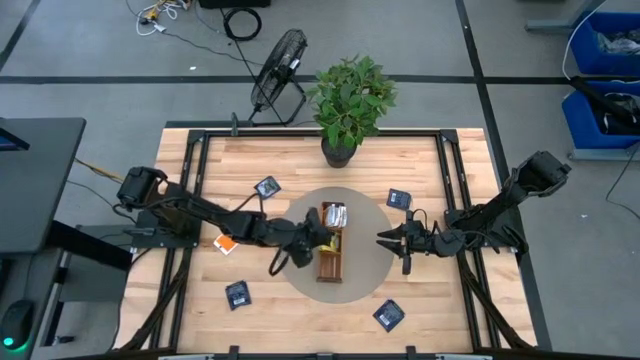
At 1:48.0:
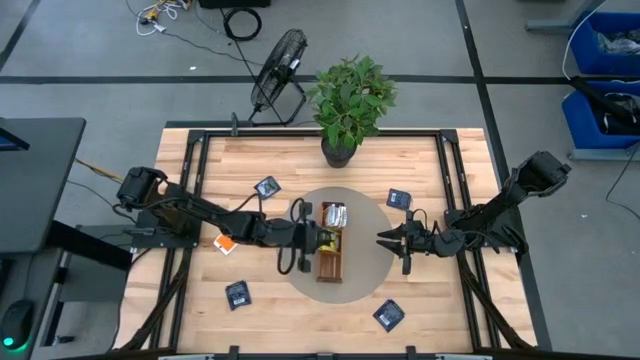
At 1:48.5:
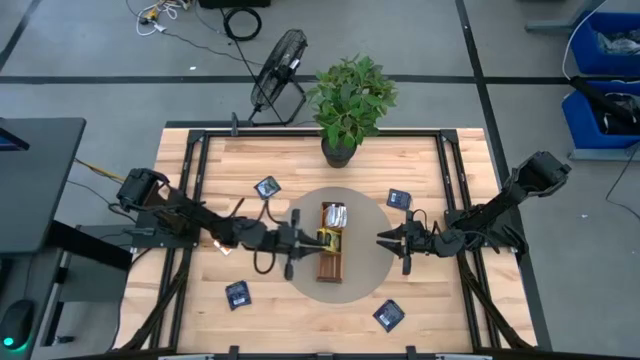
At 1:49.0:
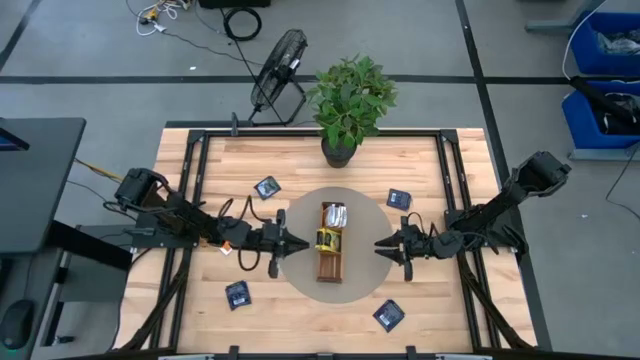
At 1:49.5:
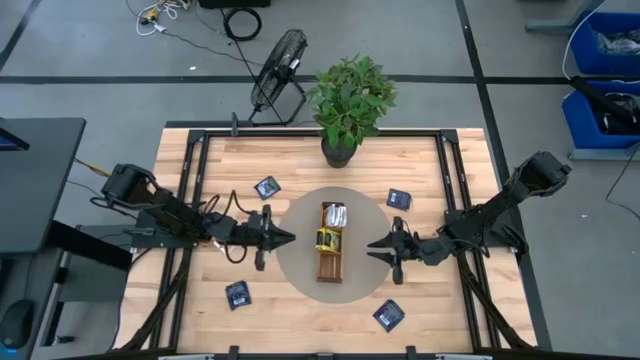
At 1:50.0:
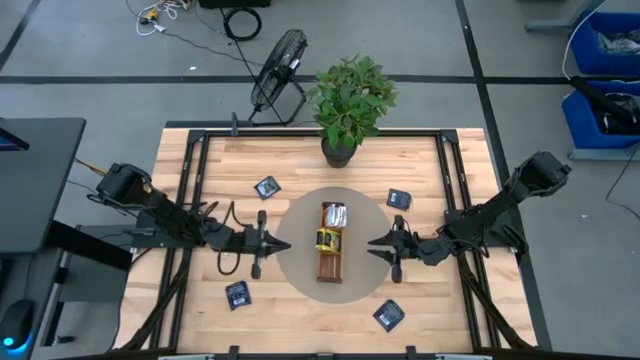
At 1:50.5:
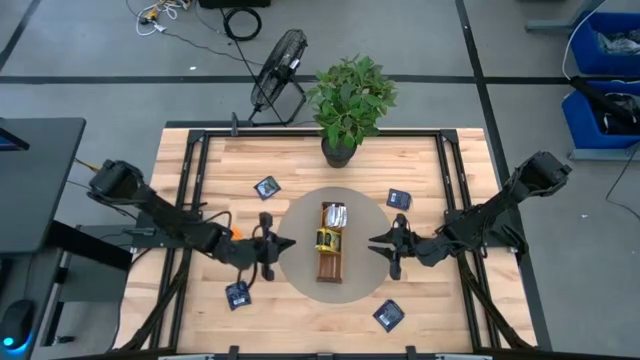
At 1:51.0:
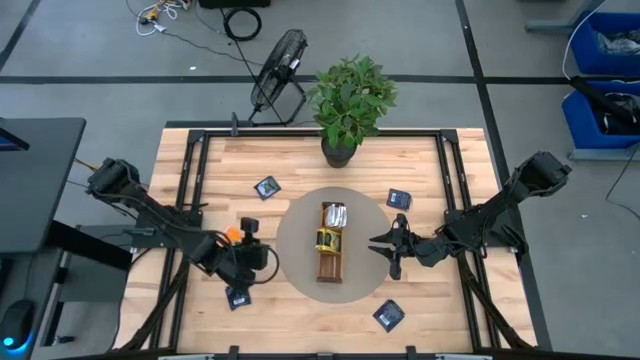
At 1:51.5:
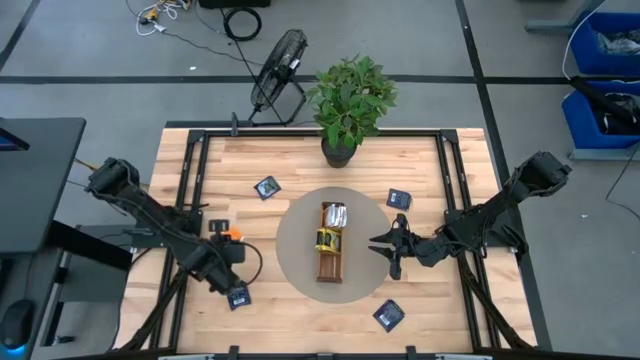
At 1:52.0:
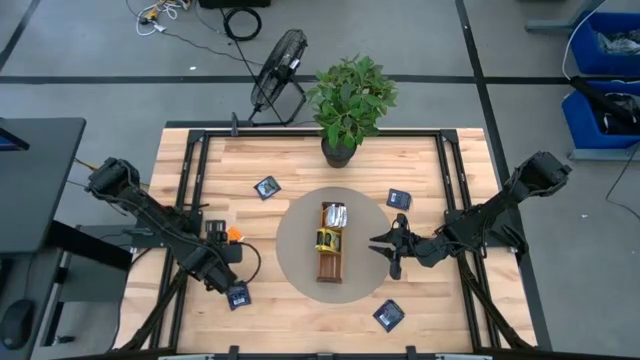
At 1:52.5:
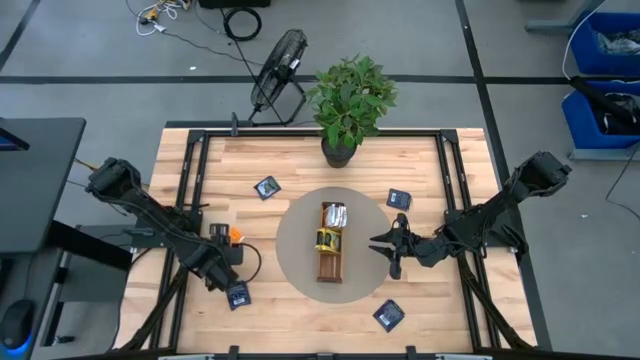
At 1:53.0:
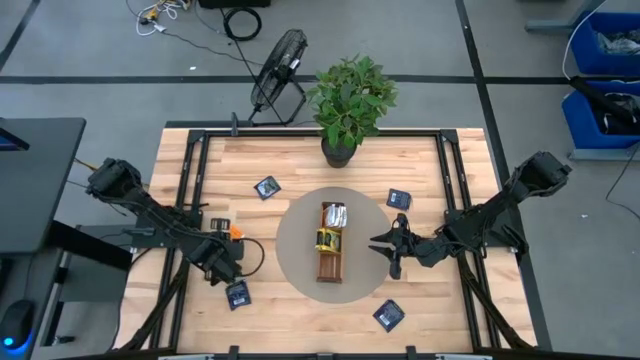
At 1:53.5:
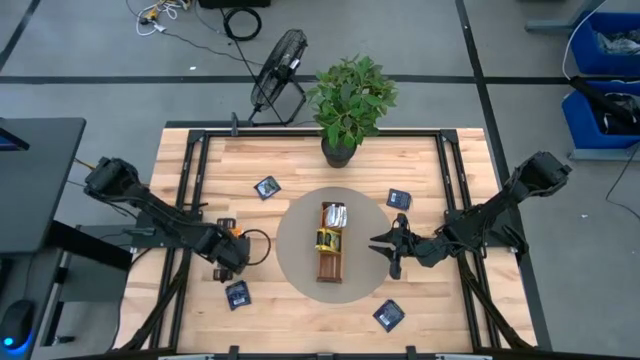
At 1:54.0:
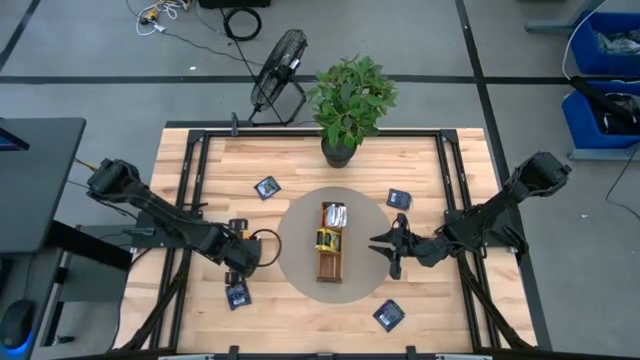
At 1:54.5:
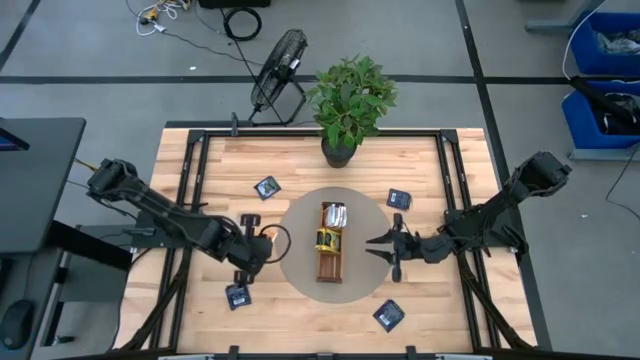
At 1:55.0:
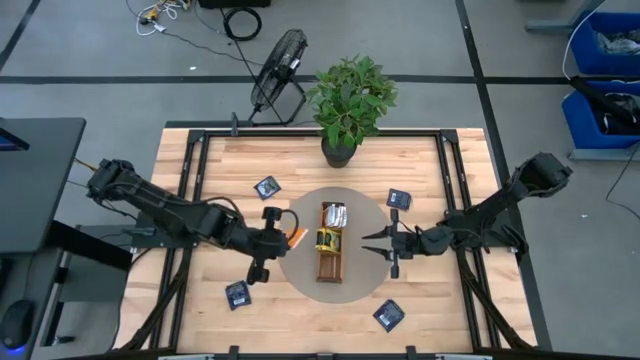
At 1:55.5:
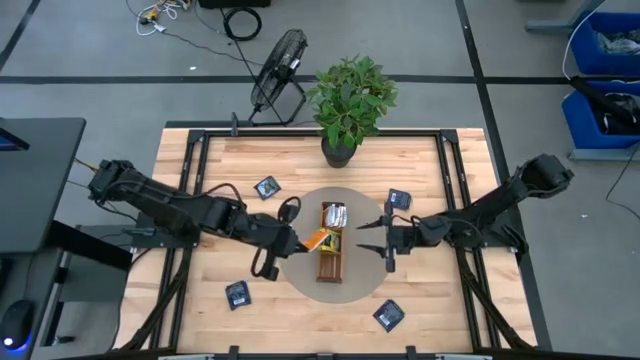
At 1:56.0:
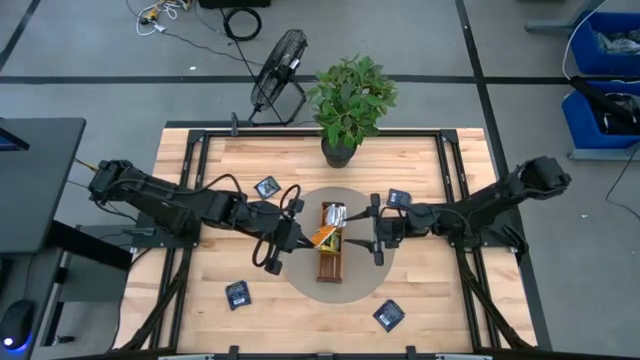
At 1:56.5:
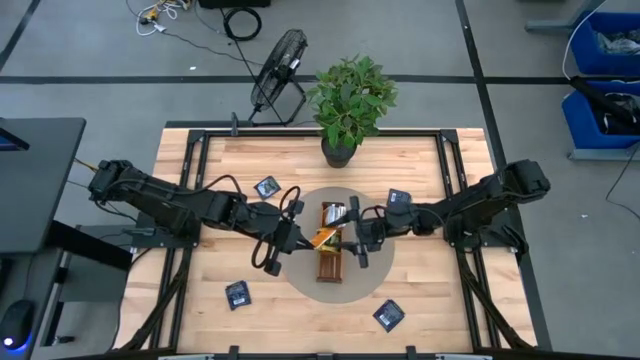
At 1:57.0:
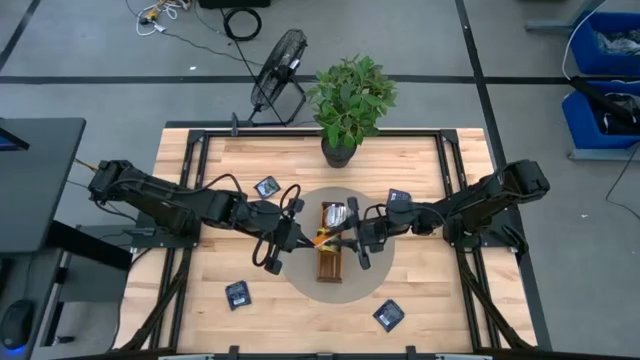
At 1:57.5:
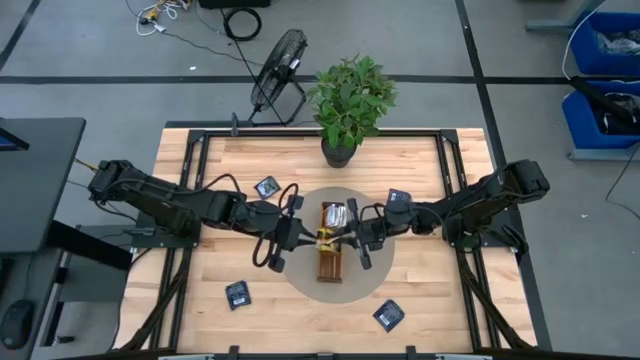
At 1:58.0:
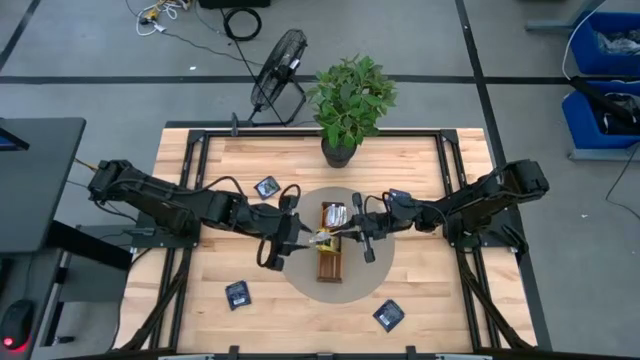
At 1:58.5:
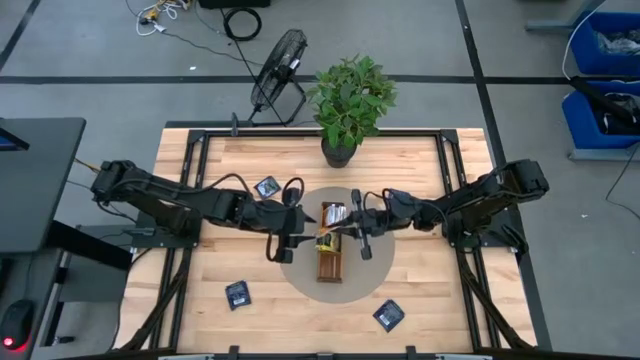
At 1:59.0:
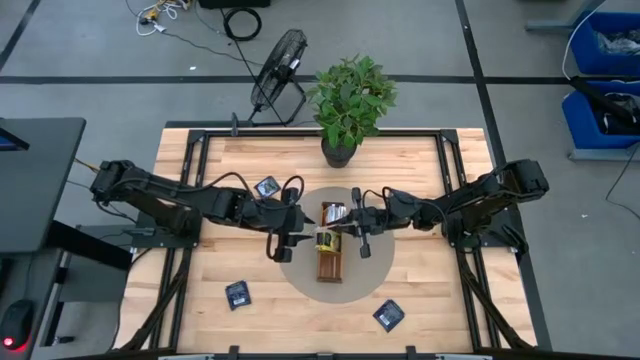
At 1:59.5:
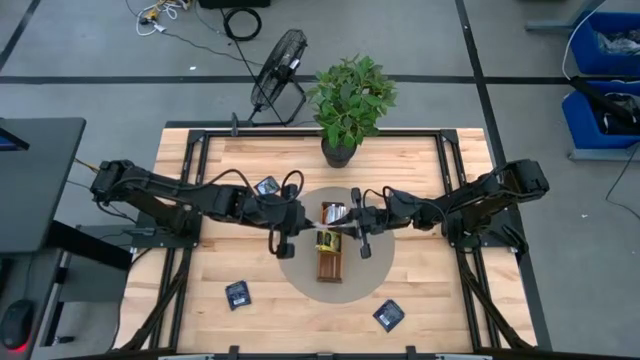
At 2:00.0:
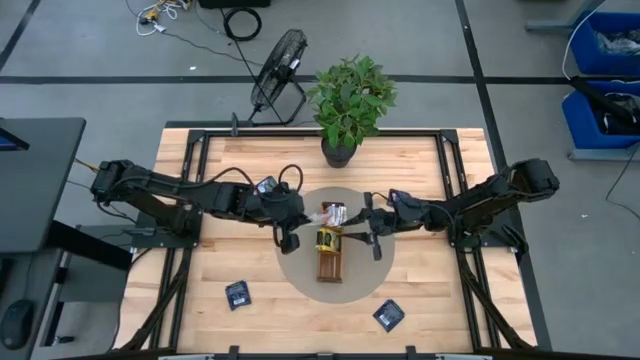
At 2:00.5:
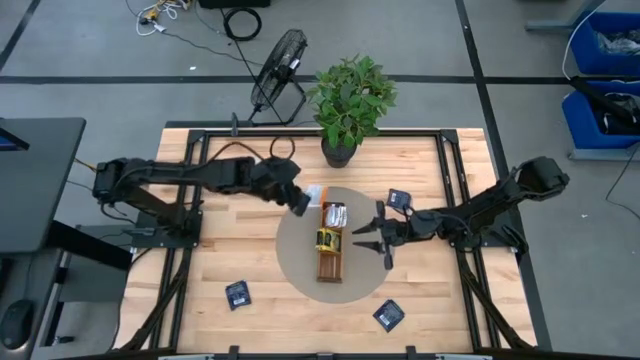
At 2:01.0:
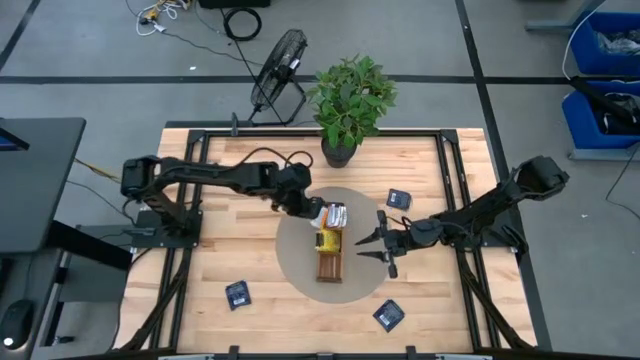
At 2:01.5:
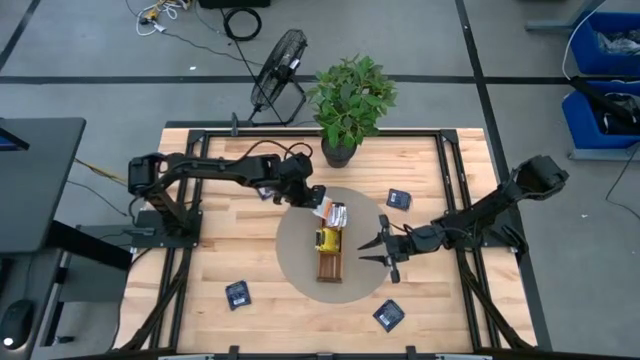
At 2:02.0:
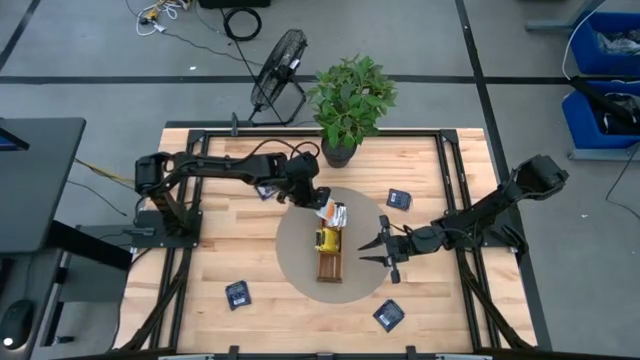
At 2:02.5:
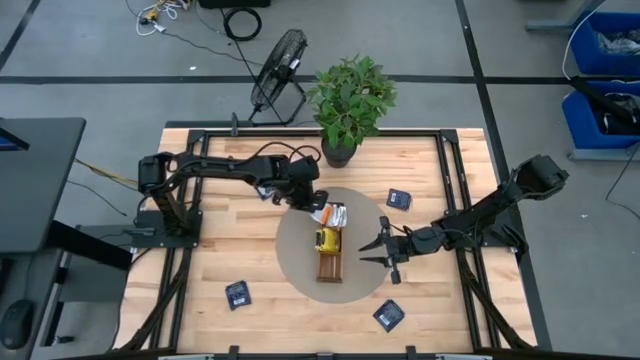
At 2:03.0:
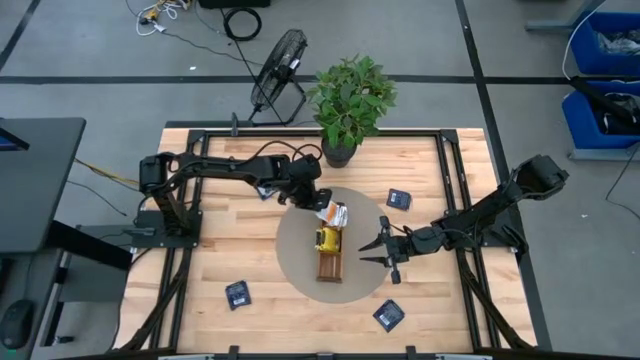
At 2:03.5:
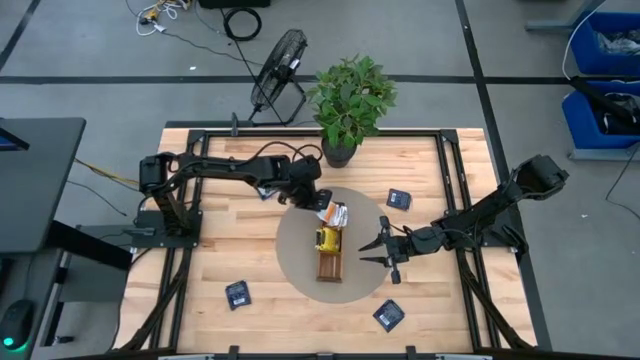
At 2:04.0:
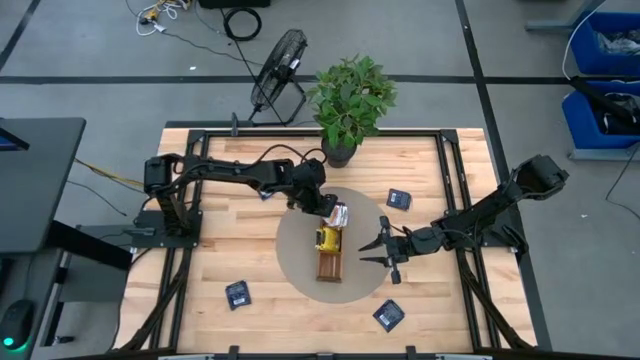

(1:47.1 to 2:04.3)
Task: Pick & Place Tea
Put the orange tea bag into the top compartment of the top section wooden organizer

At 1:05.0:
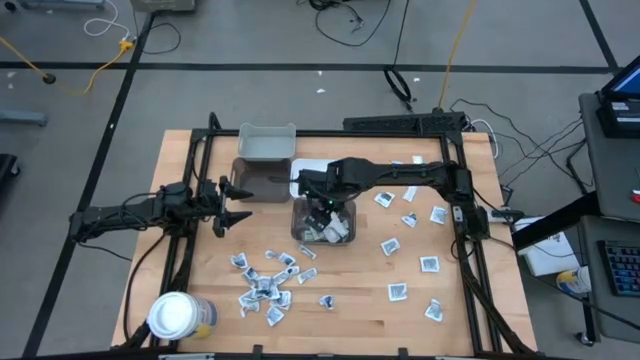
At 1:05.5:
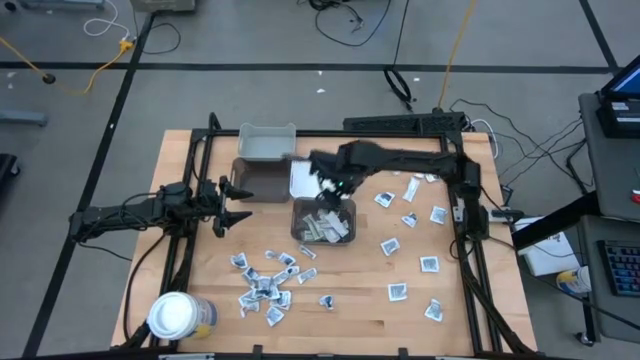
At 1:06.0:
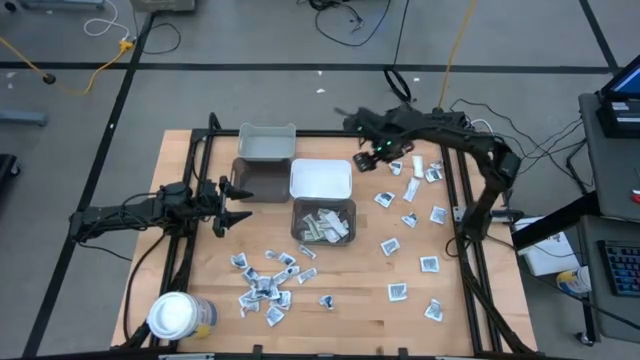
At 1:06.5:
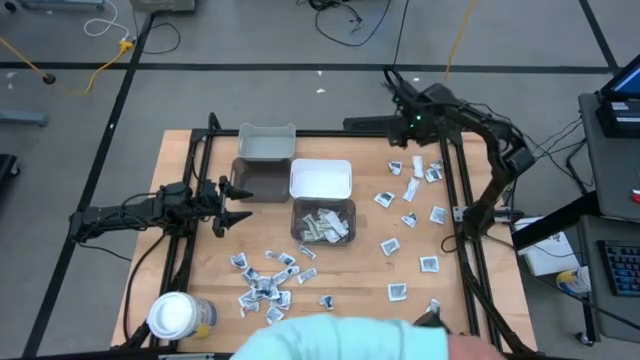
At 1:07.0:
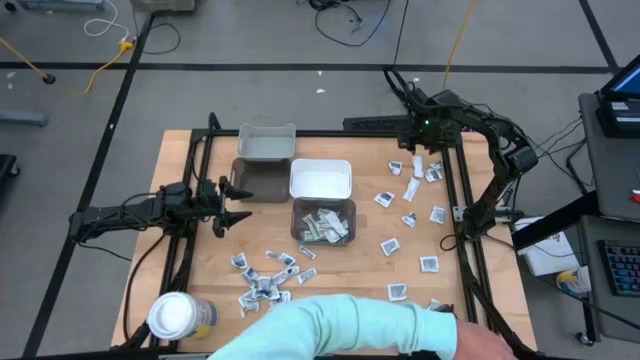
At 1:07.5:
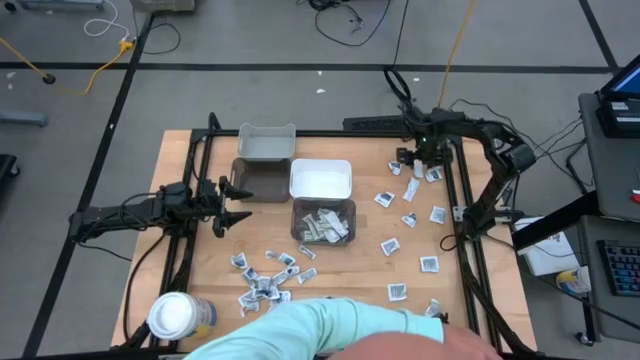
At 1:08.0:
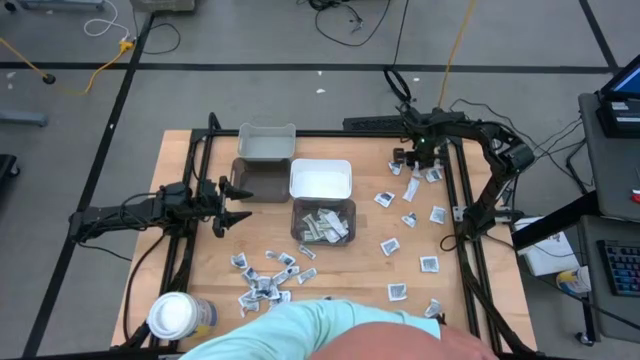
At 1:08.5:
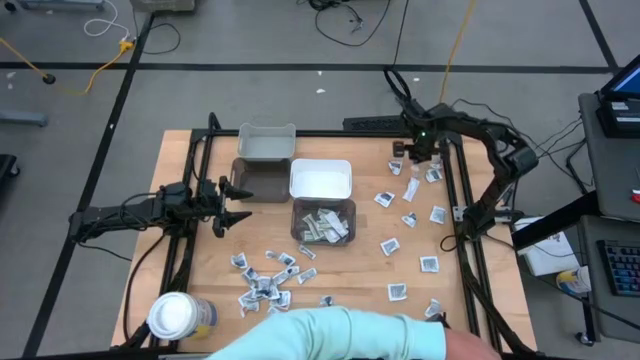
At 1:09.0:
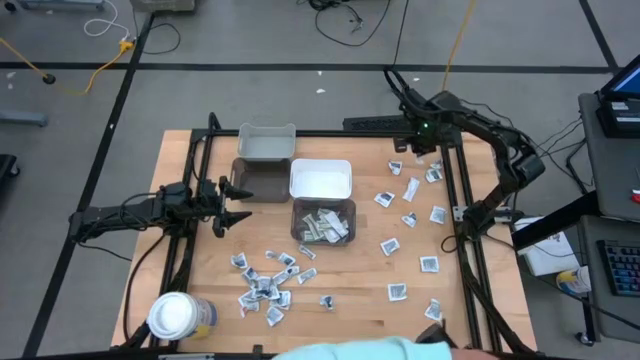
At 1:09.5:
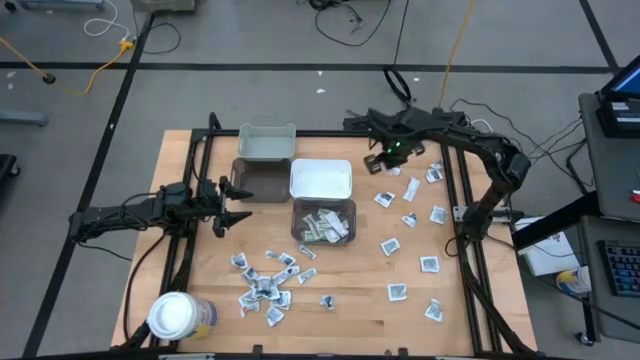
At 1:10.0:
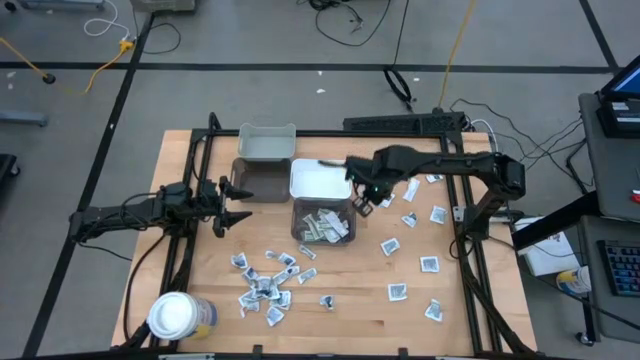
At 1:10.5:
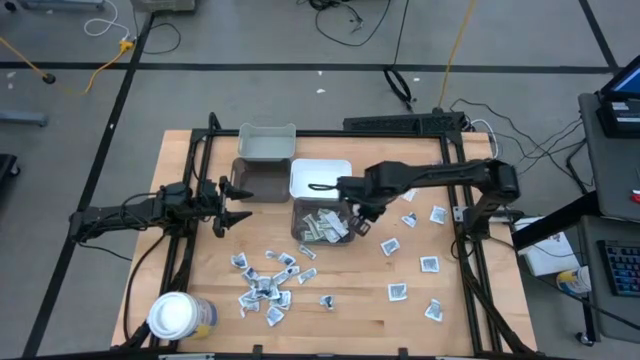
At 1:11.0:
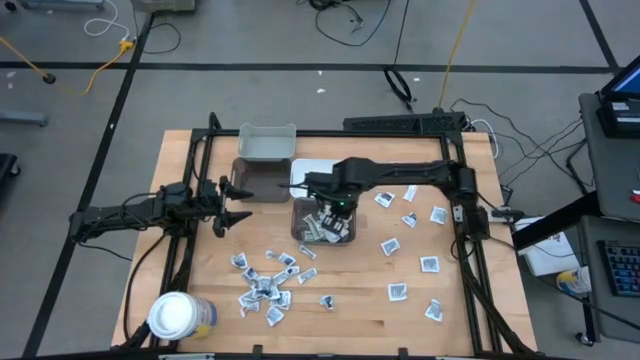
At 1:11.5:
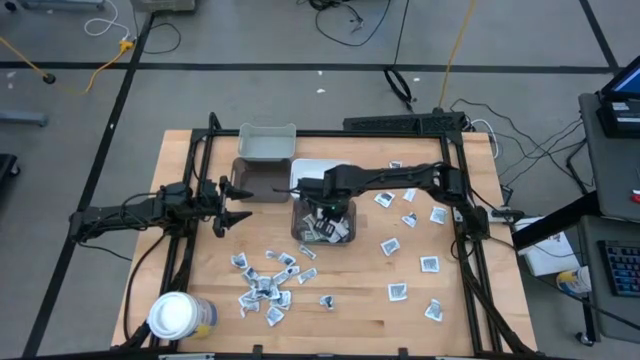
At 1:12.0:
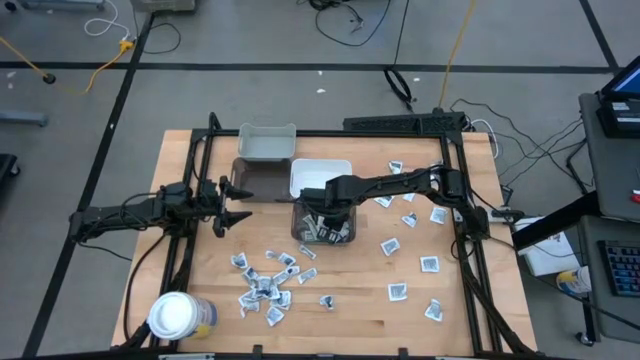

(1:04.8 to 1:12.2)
Task: Pick & Place First Aid Supplies
Put the green bandage pack into the right black bin
